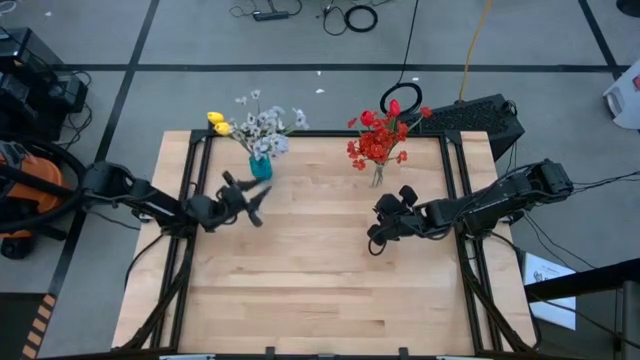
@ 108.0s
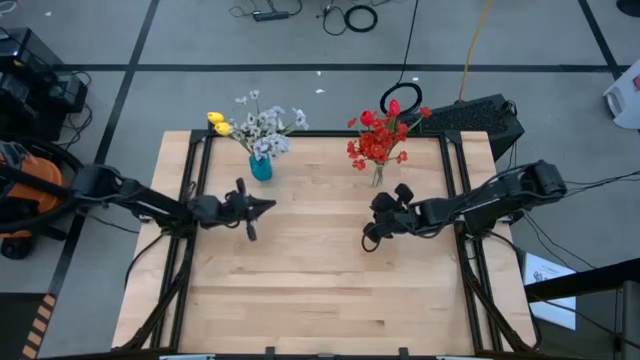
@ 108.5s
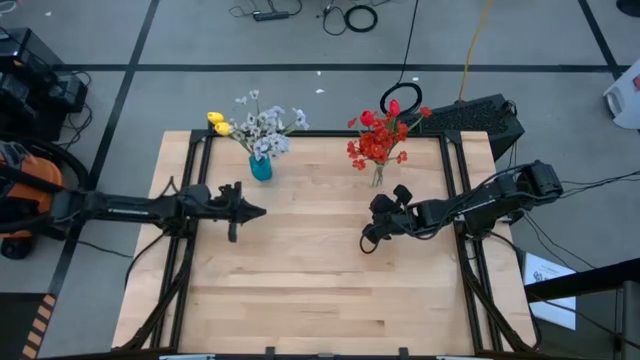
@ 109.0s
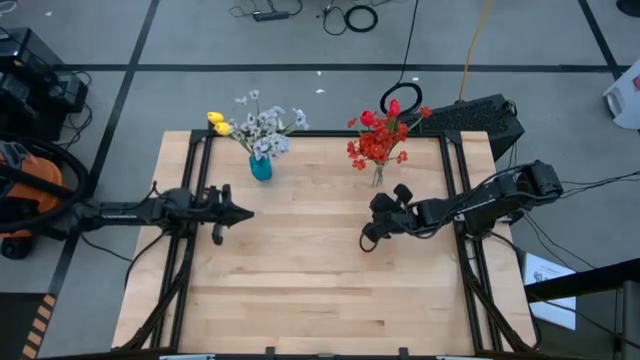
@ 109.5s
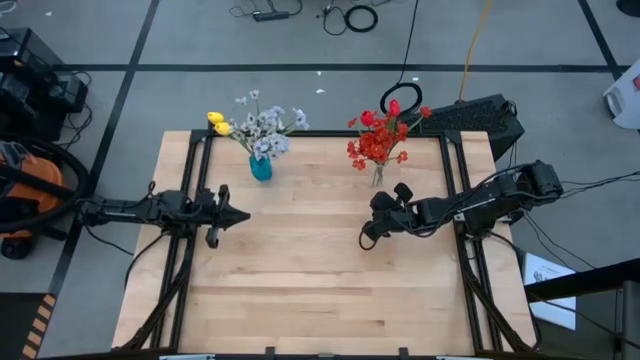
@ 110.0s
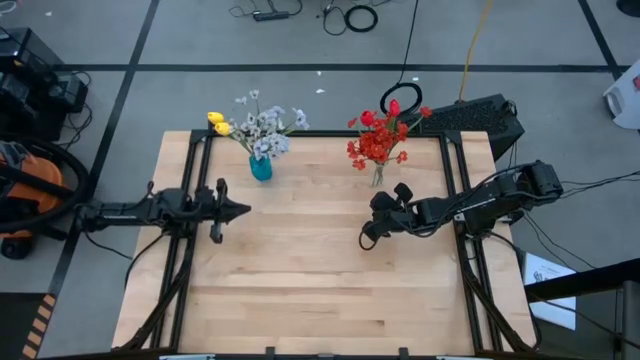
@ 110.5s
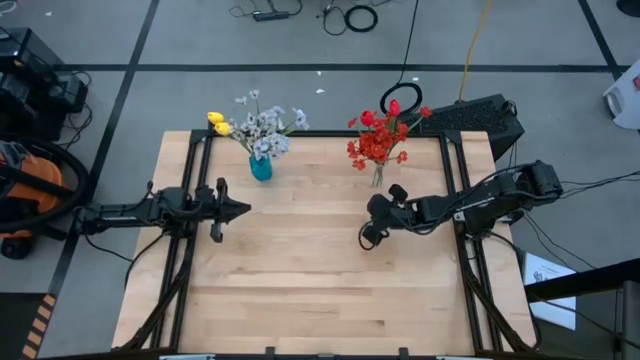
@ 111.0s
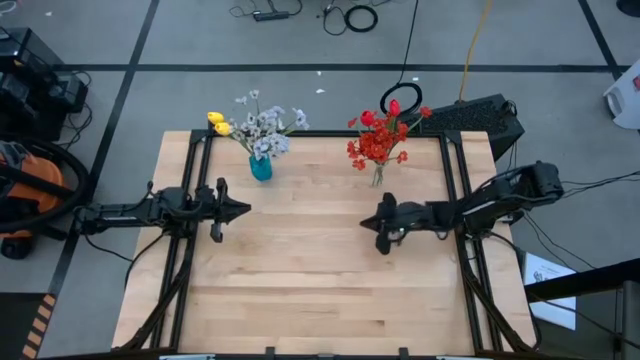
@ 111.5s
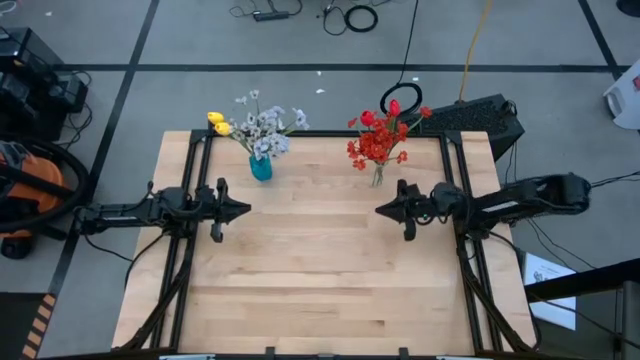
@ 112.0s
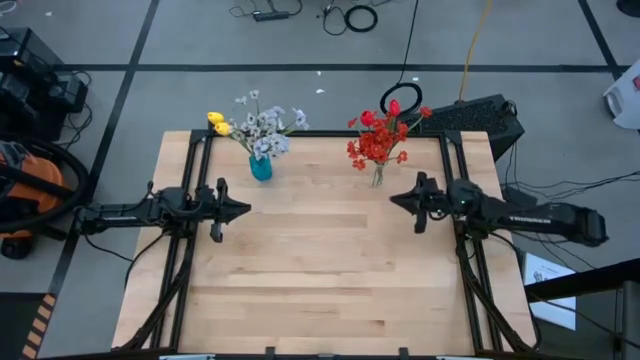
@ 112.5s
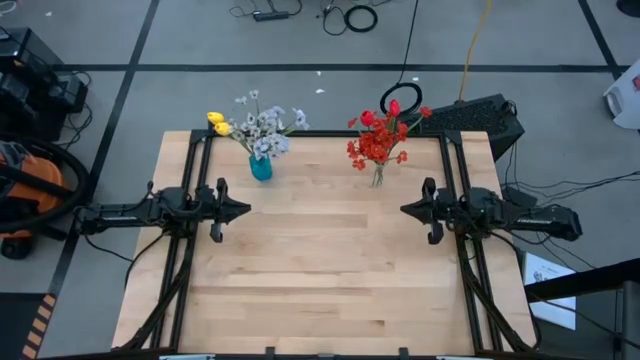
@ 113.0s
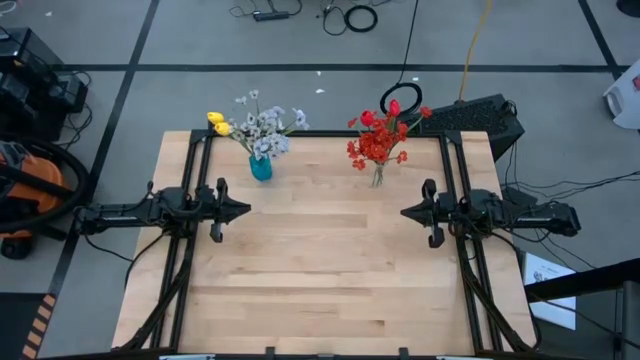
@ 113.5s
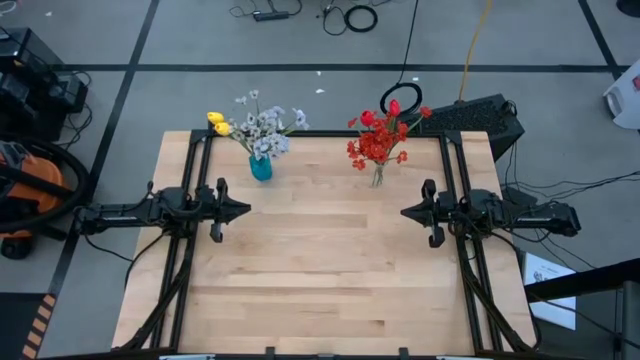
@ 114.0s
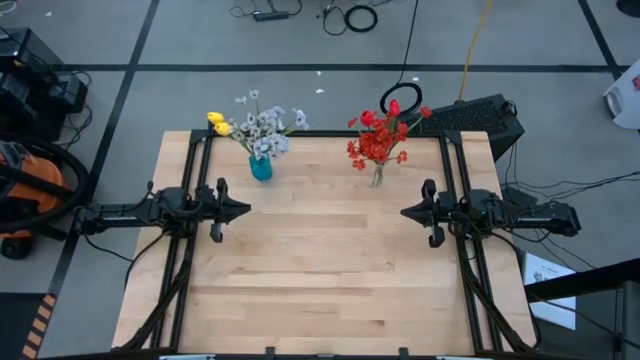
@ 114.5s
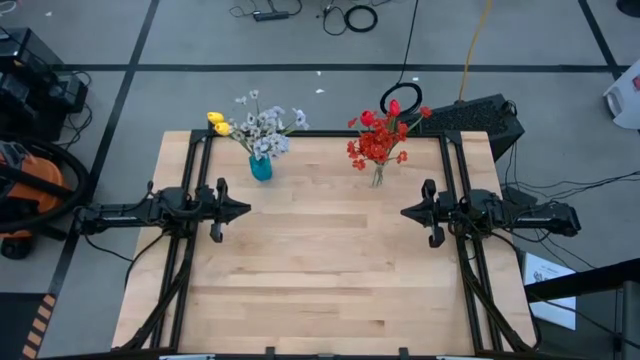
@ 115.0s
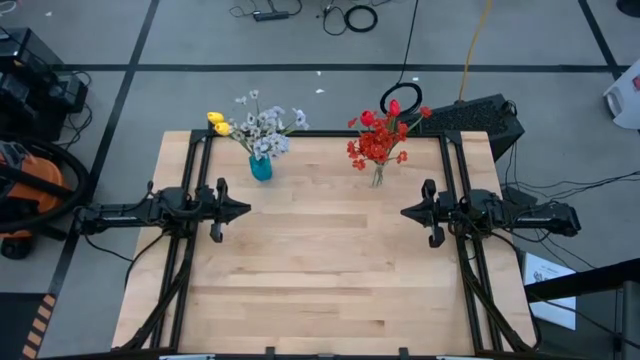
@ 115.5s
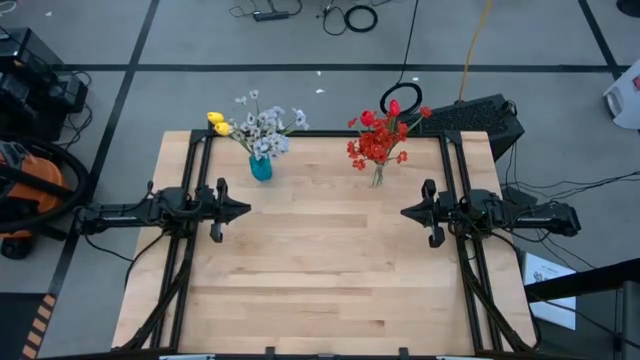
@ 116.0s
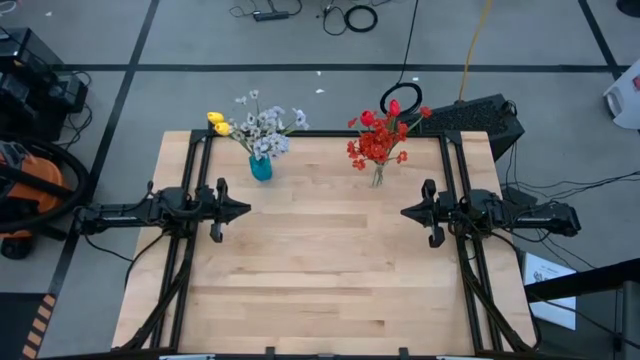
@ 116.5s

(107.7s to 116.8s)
Task: Sort flowers into vase by color
Return to Home Position

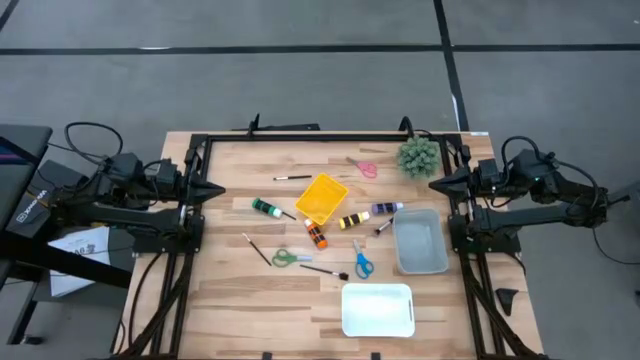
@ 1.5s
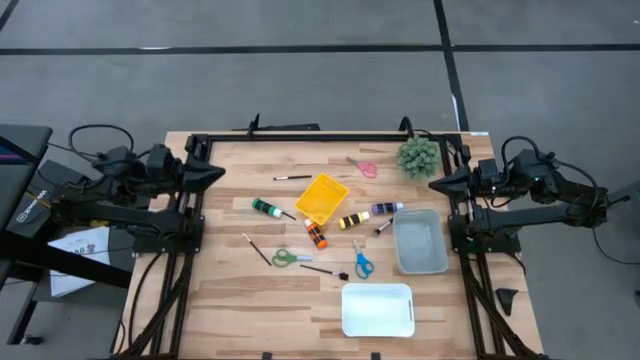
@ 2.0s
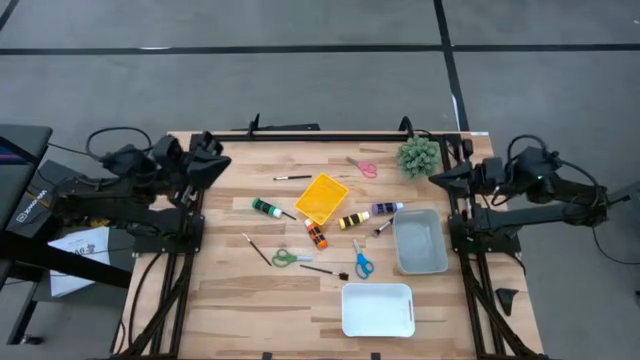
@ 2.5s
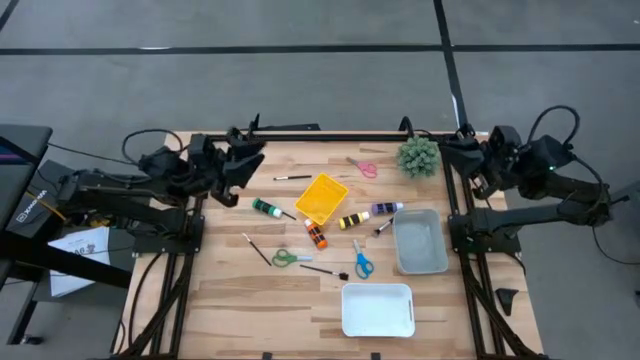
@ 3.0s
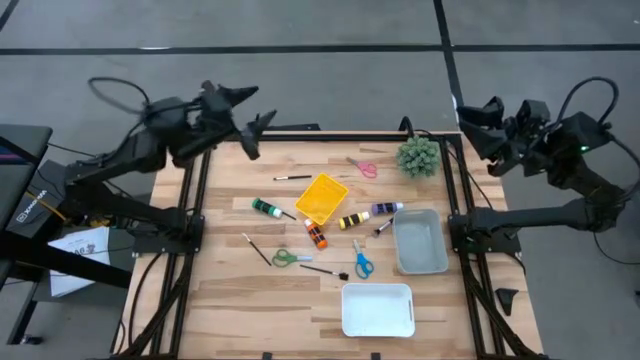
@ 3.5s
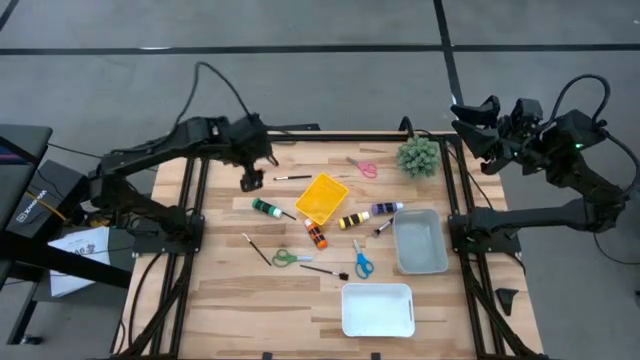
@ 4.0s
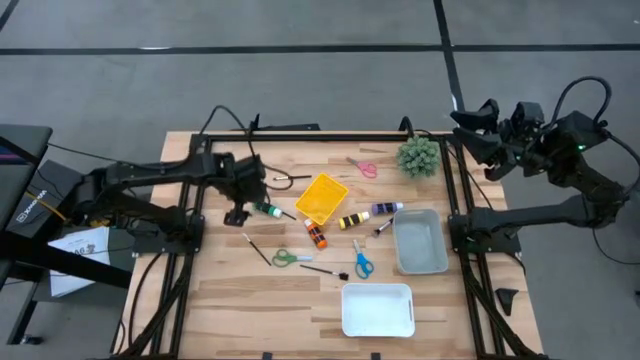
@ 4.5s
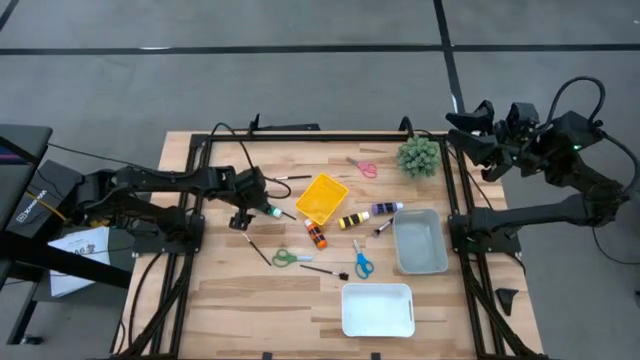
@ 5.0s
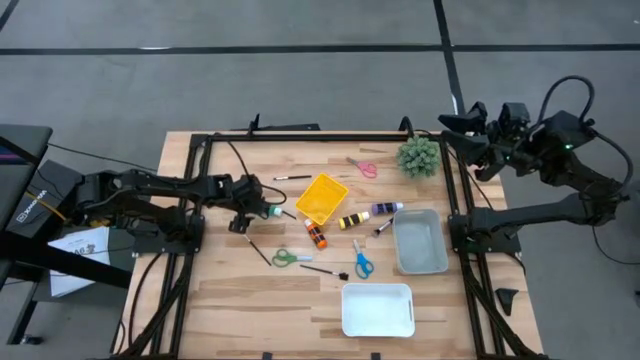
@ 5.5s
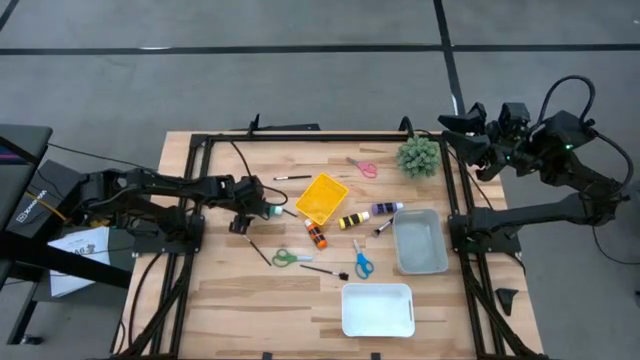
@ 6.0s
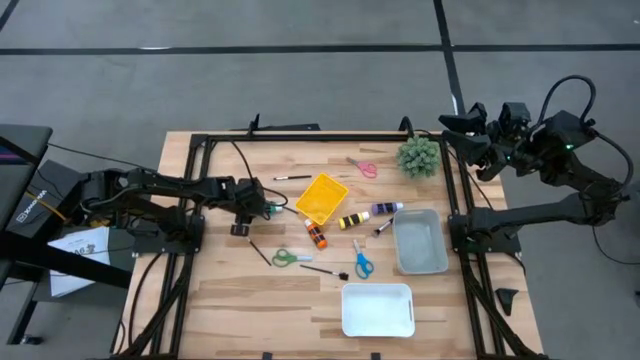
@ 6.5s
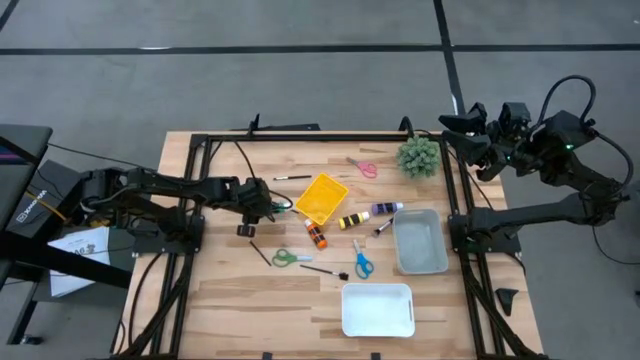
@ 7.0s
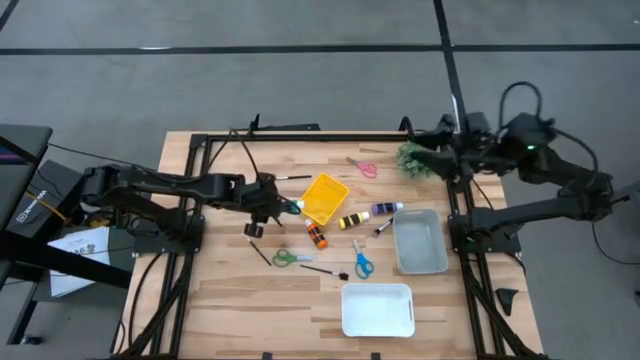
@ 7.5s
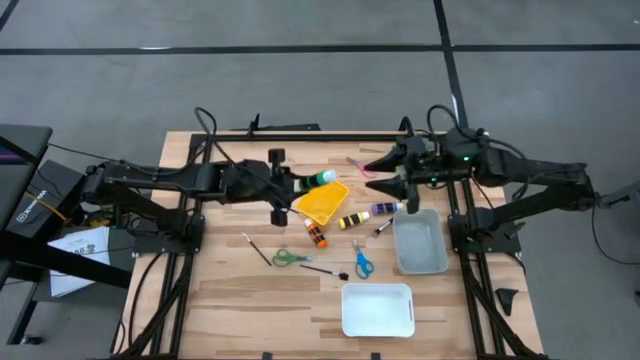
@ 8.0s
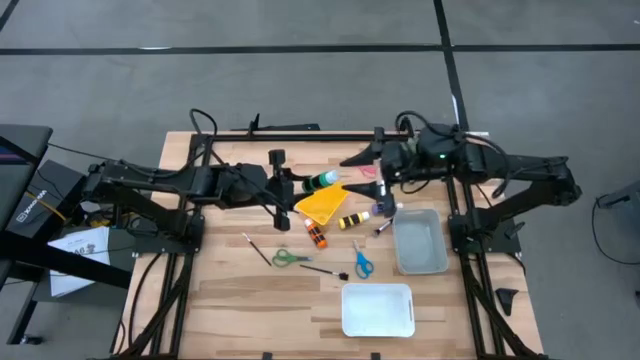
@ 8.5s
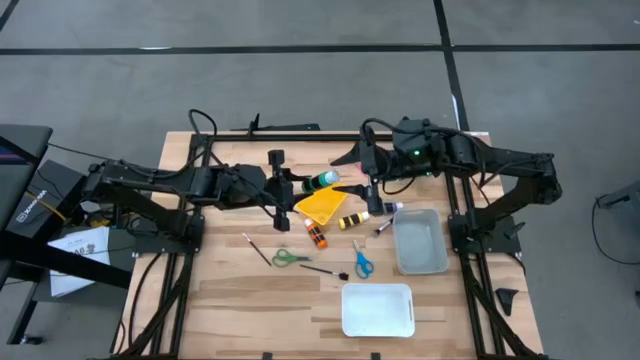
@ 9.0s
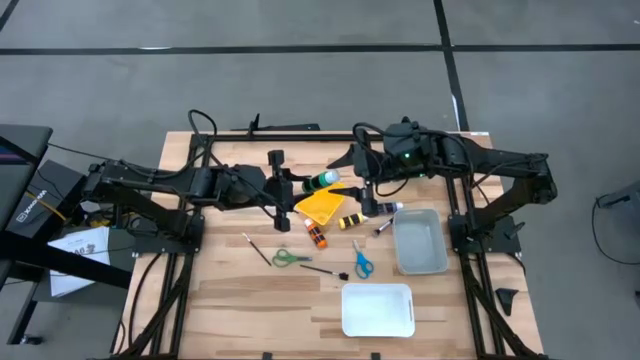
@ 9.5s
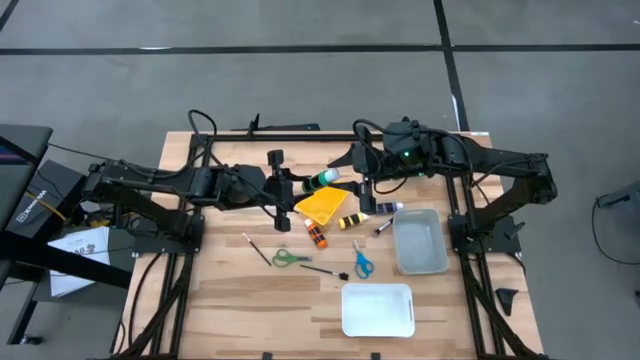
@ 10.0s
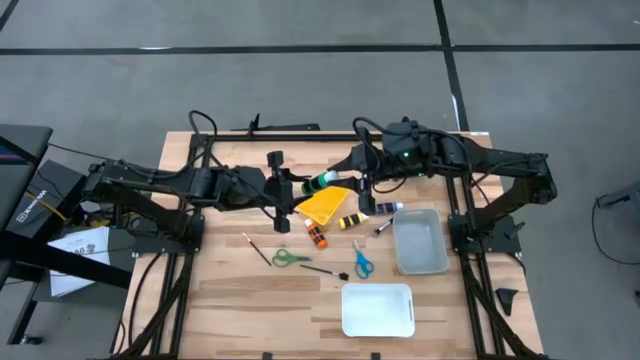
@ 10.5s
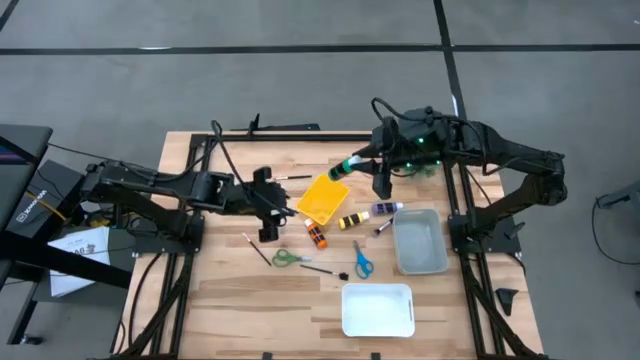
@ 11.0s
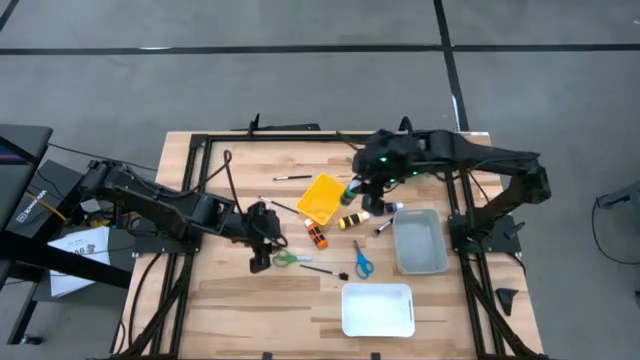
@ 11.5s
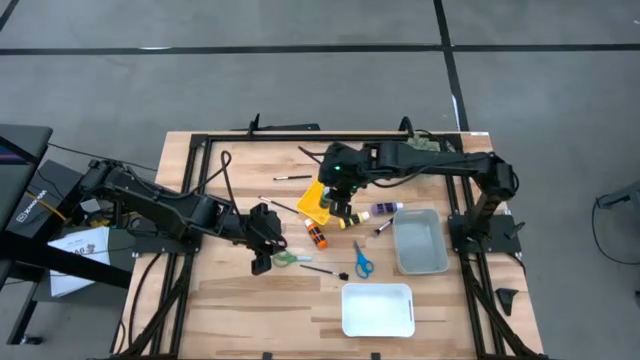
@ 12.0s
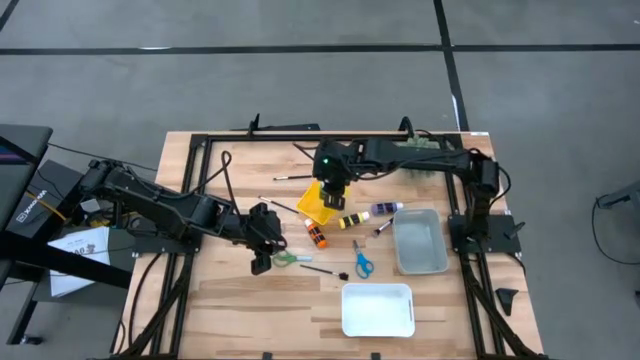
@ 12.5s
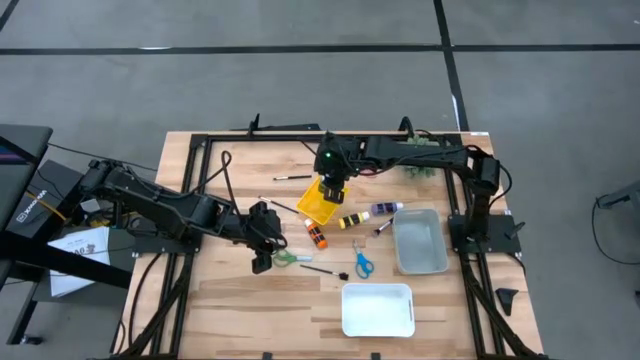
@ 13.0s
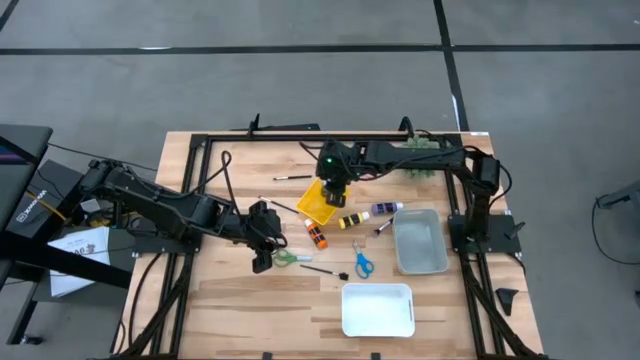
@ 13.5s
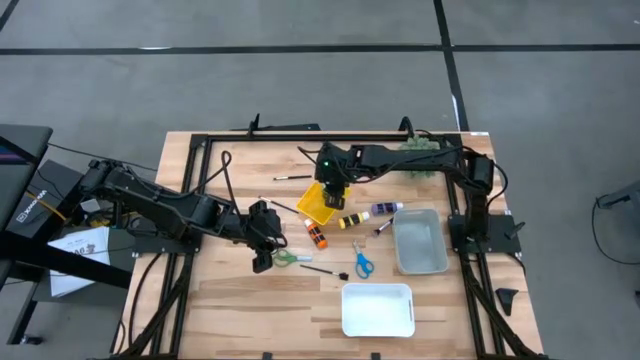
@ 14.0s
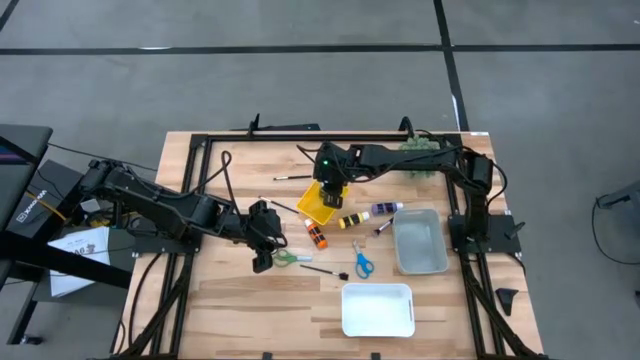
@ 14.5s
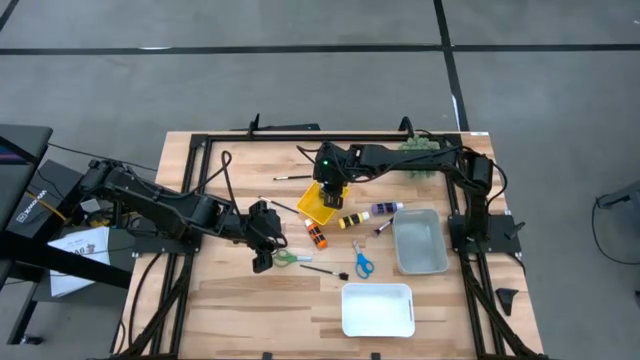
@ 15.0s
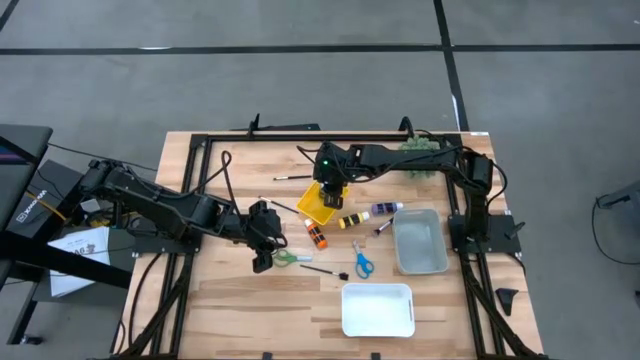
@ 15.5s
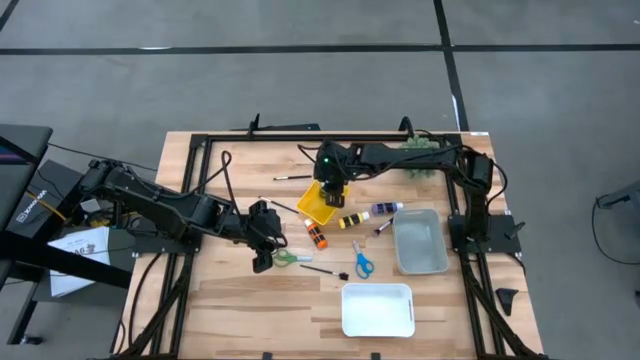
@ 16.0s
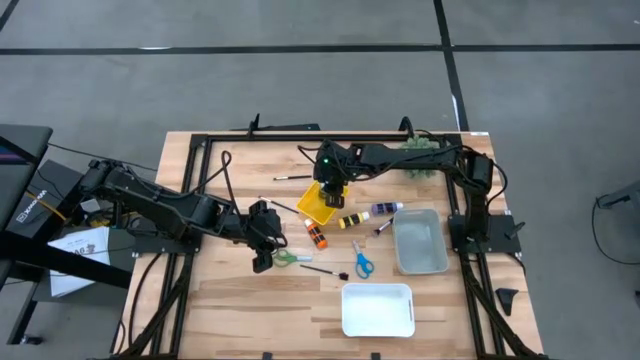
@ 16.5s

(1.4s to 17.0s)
Task: Pick & Place Paint Supplies
Put the green paint bottle into the yellow bin
